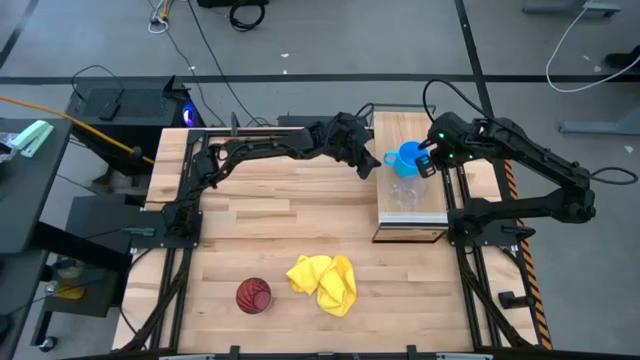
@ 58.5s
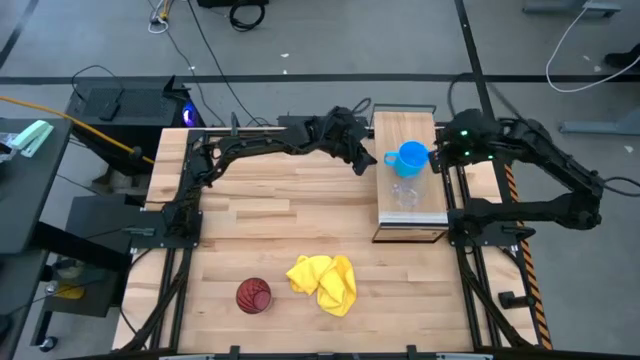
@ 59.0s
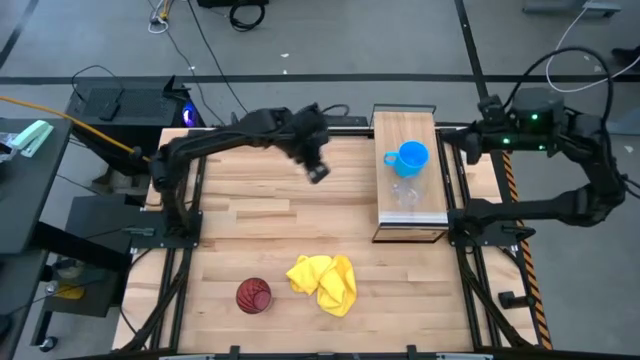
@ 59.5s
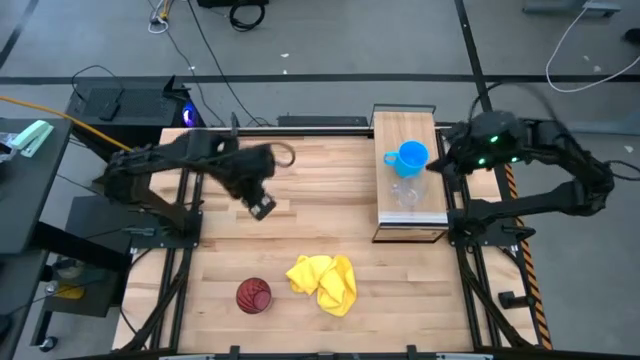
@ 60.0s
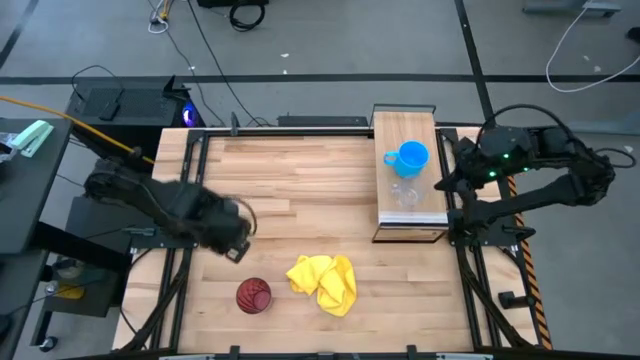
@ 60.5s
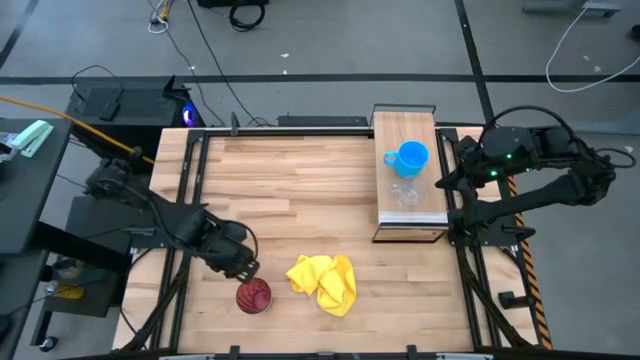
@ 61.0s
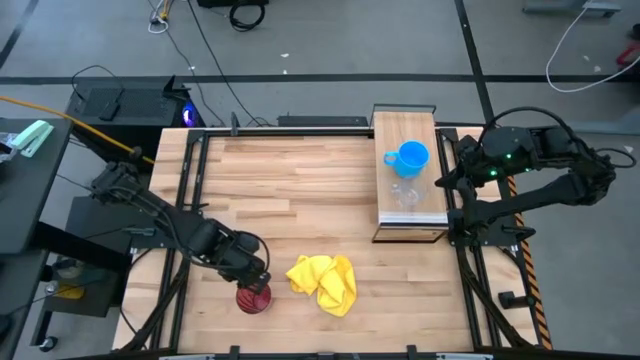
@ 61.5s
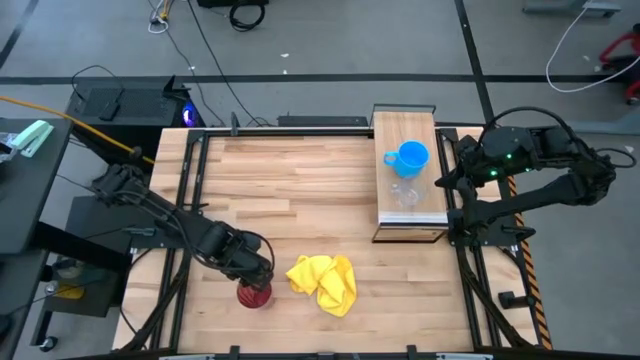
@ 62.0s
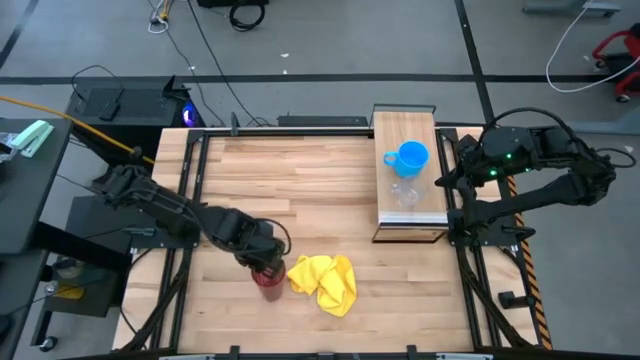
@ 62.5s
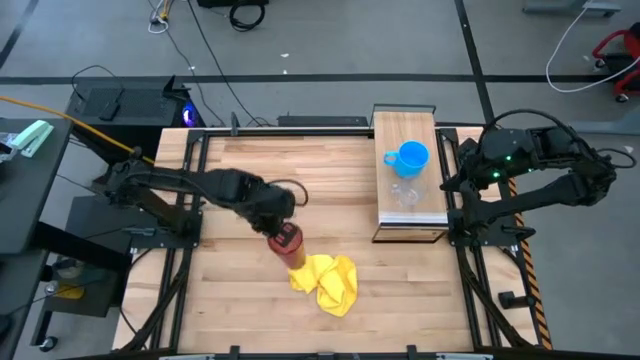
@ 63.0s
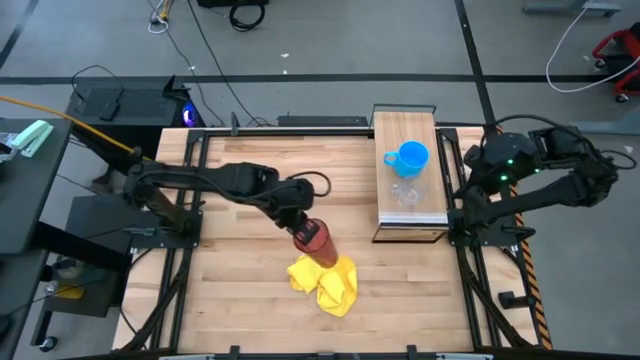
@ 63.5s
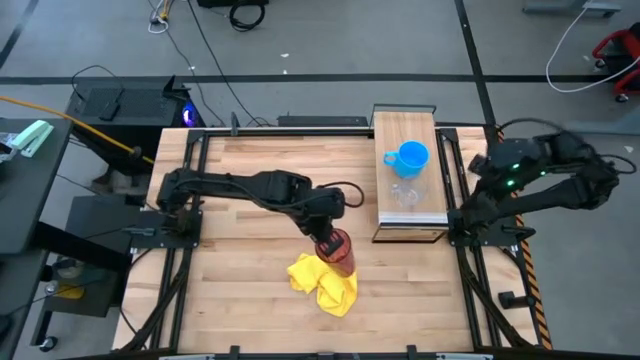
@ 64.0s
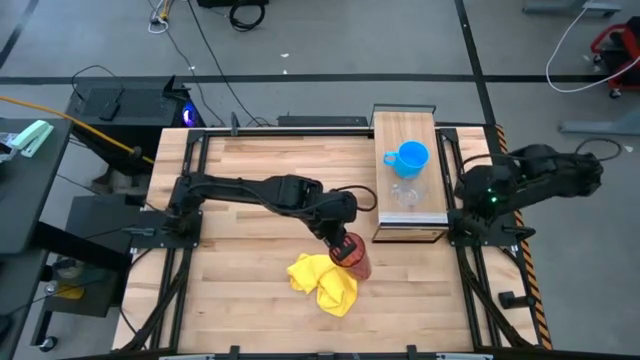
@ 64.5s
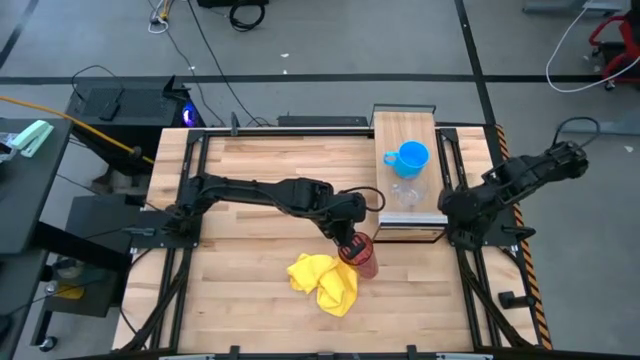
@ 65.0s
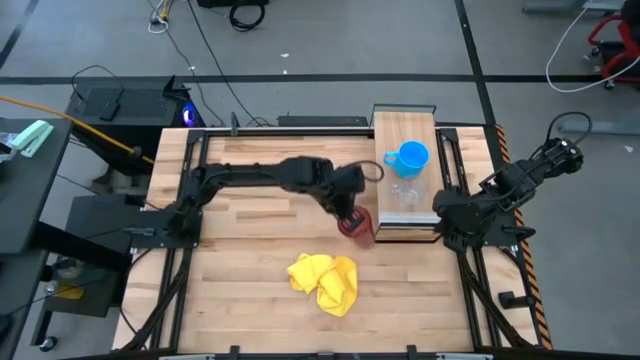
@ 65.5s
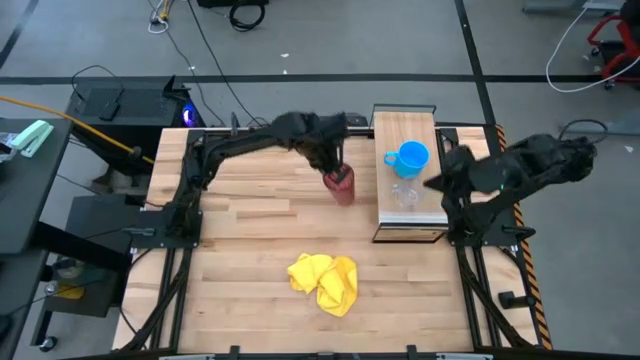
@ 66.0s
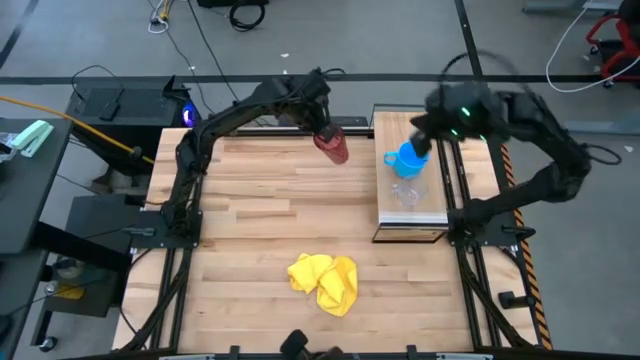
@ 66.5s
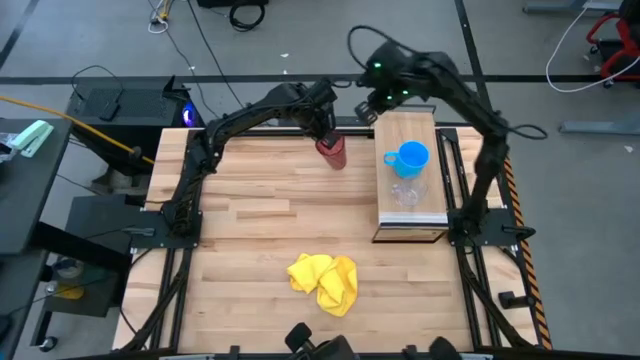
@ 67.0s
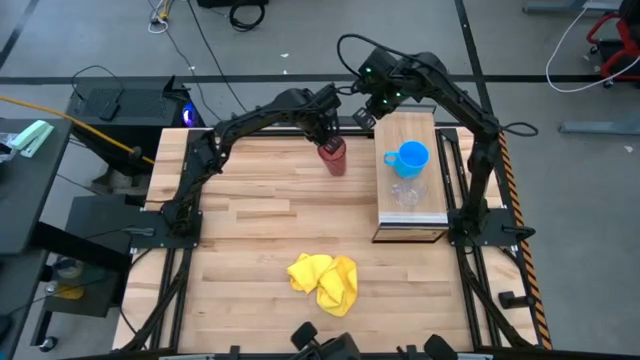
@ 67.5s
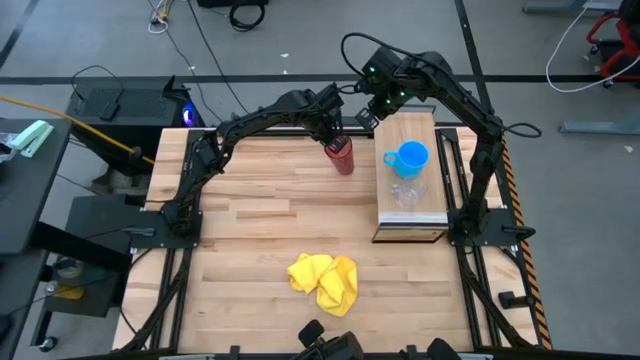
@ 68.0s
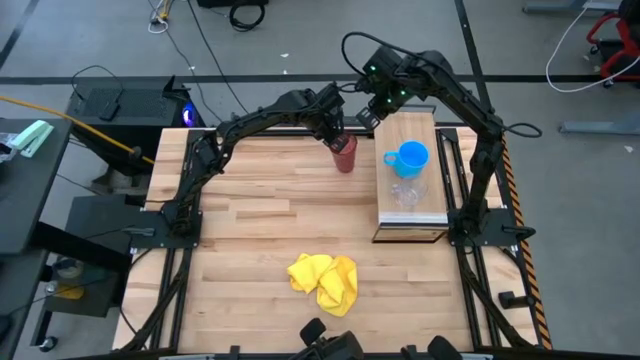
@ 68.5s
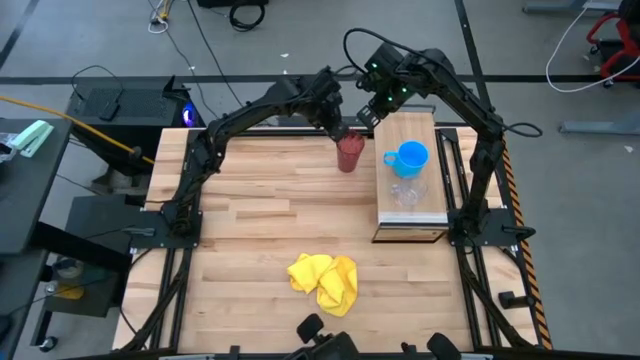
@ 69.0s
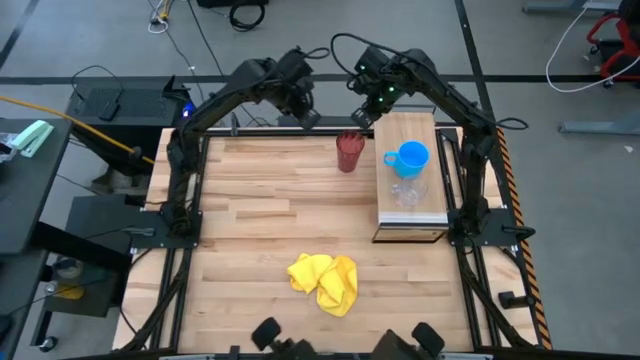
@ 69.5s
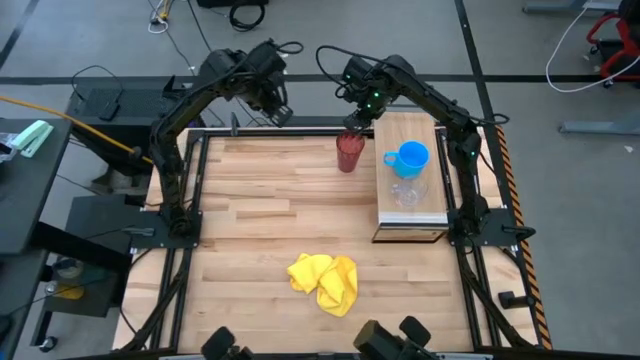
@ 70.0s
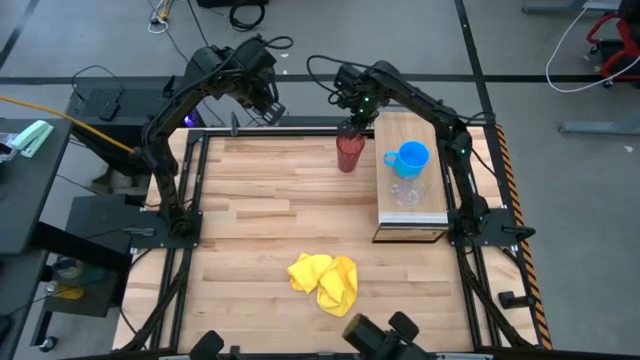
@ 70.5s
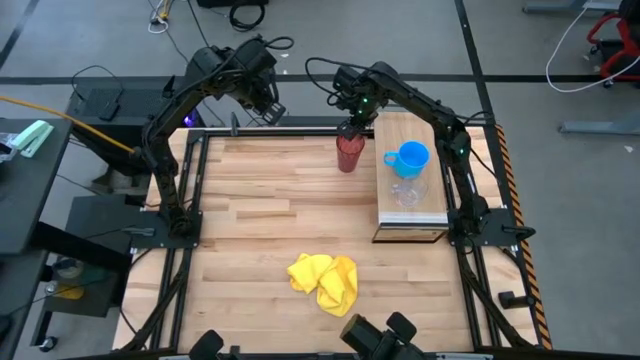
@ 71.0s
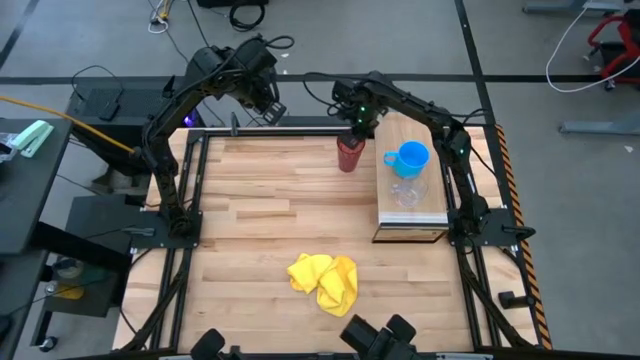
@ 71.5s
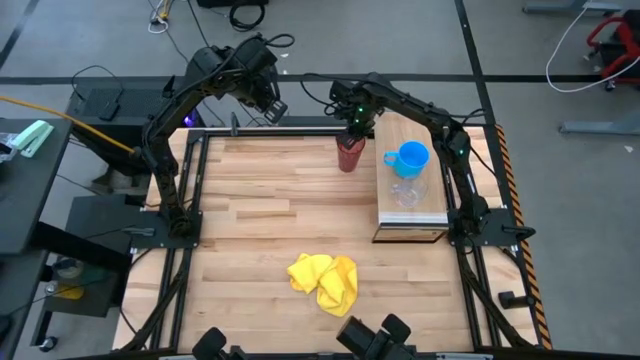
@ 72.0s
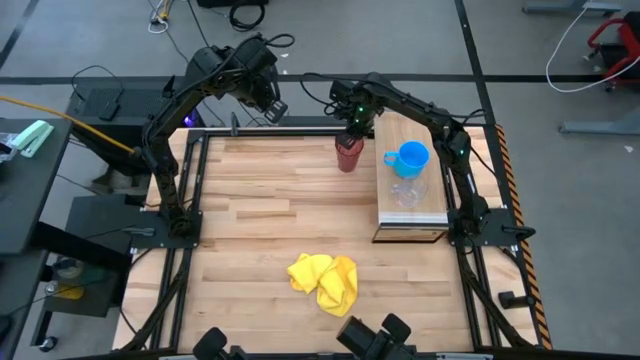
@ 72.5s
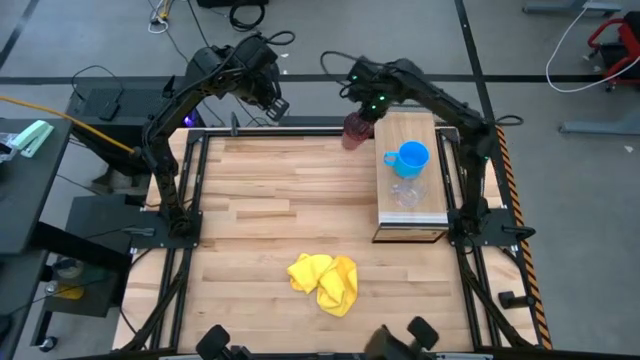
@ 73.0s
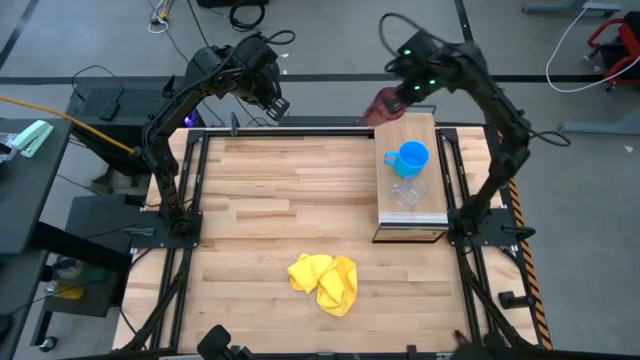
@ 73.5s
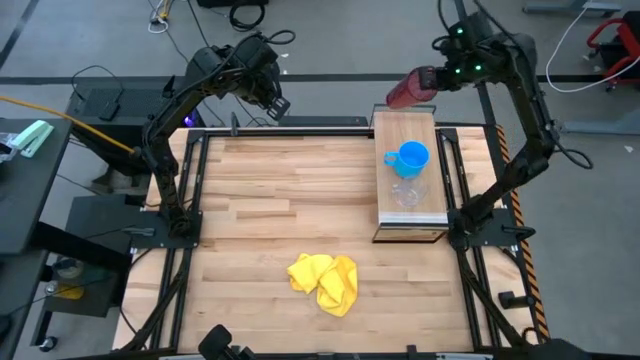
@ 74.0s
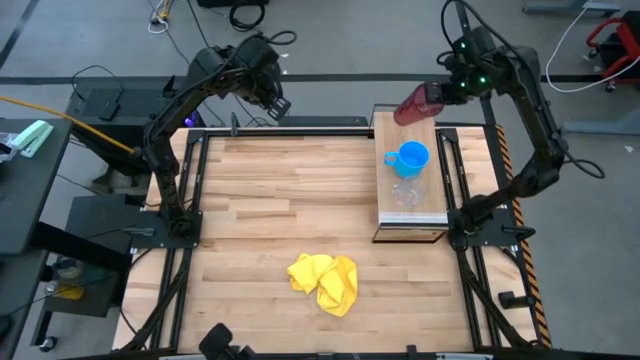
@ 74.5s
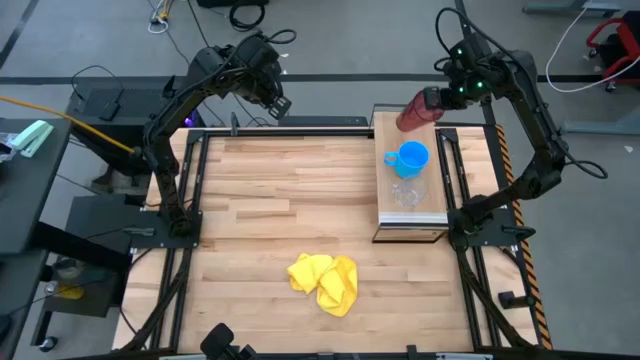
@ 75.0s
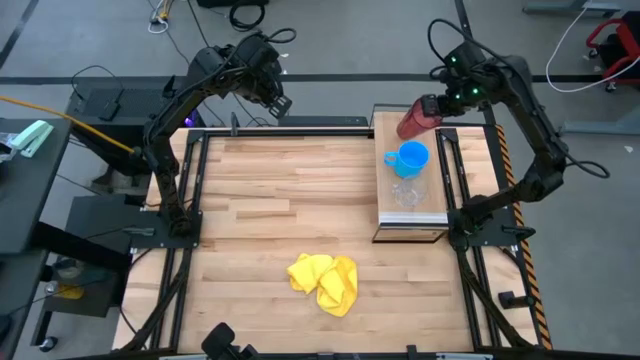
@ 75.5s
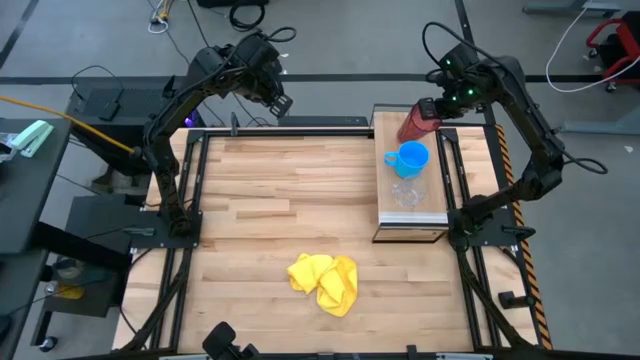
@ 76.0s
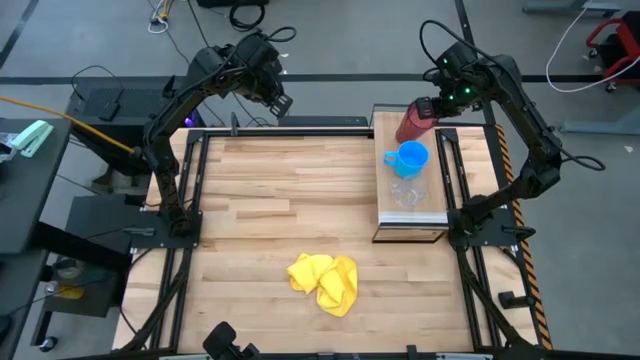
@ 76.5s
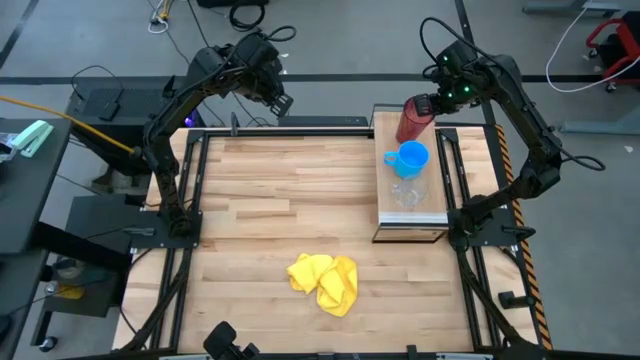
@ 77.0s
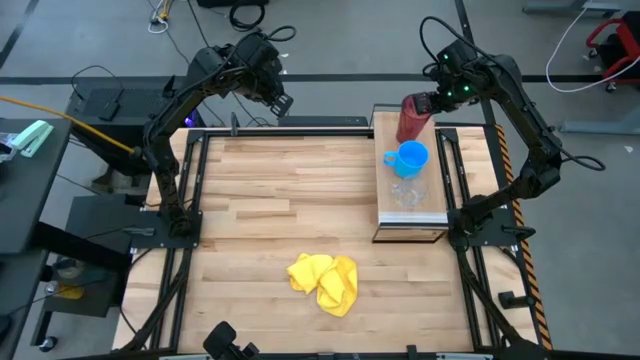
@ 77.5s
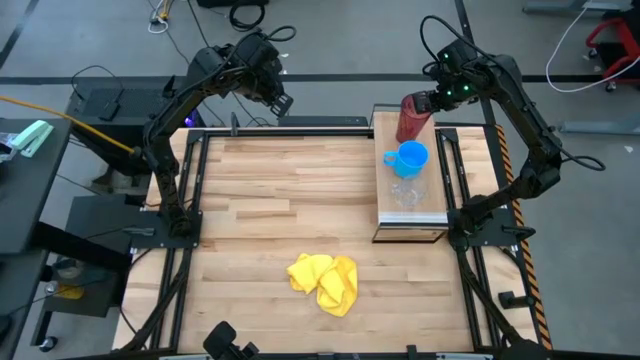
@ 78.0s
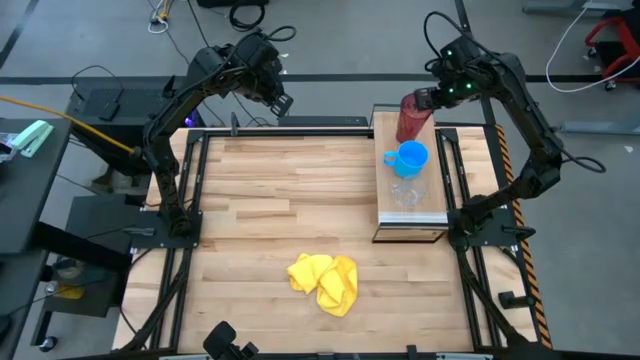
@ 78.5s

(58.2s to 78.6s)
Task: Stack small to large cups/mugs on shelf
Put the red cup on the shelf

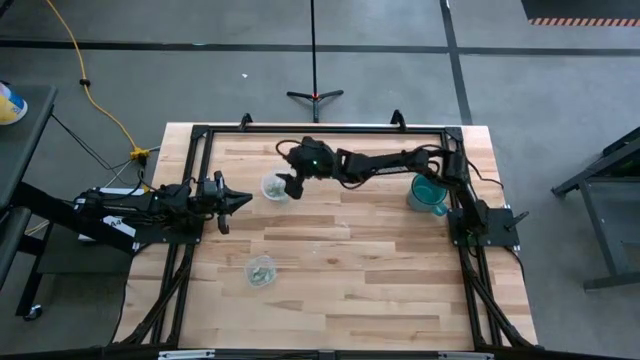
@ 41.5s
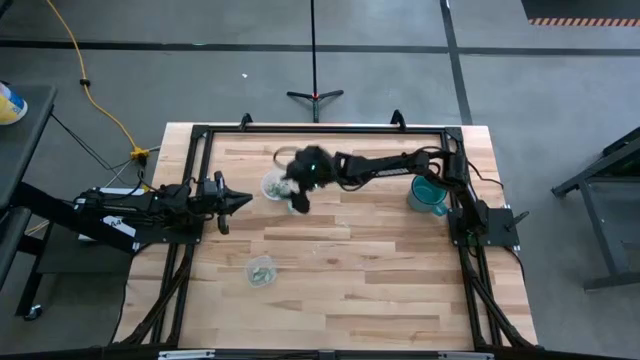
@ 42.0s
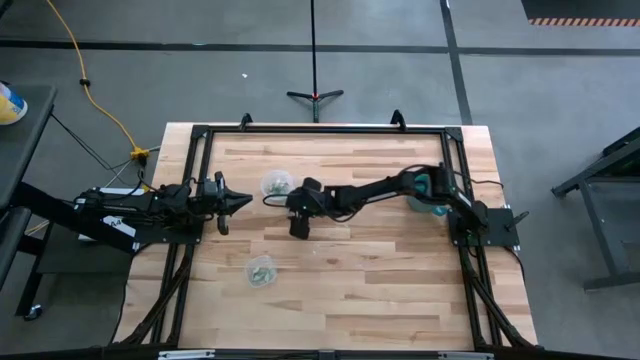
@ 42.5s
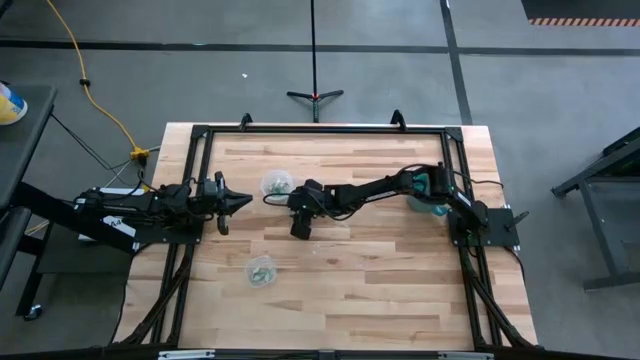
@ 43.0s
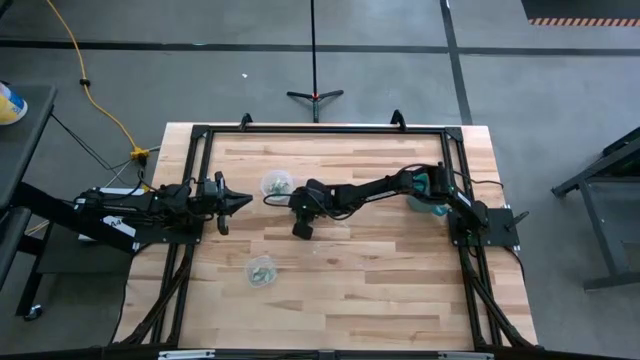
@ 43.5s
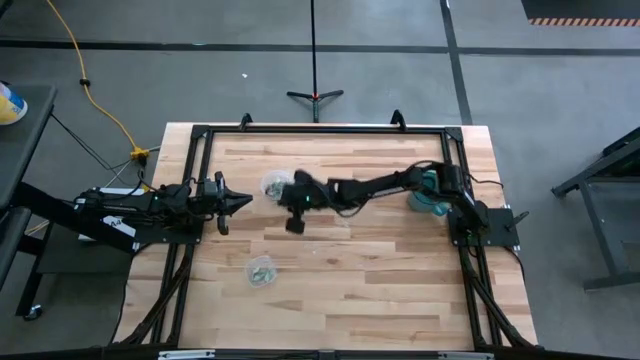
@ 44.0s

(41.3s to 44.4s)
Task: Pick and place items into bin
Put the white stevia packet into the top transparent bin
